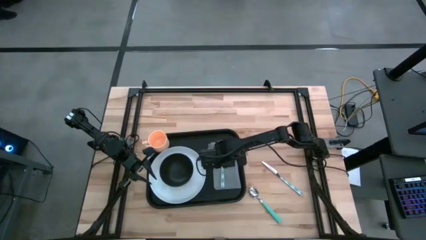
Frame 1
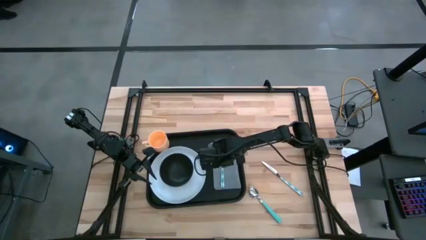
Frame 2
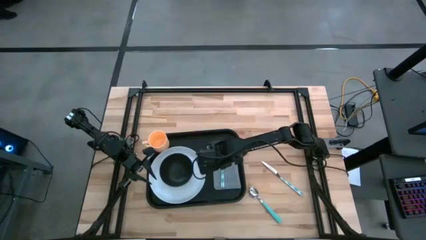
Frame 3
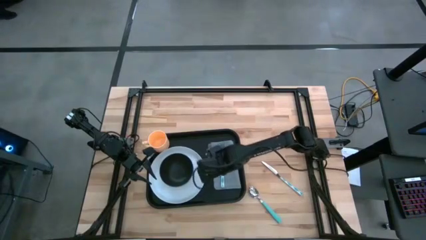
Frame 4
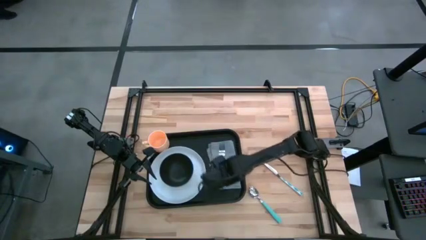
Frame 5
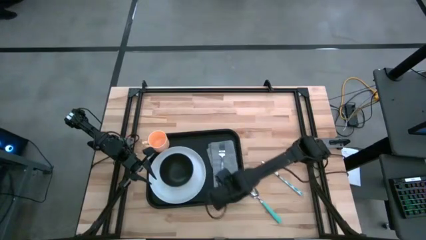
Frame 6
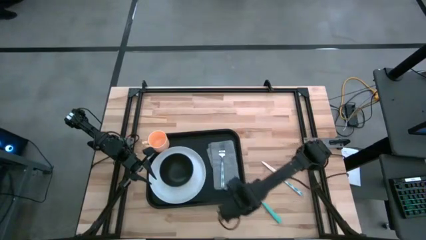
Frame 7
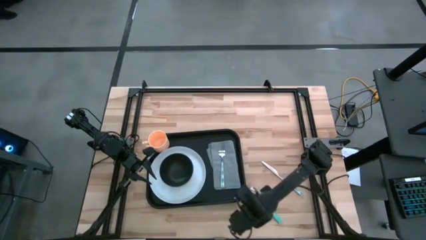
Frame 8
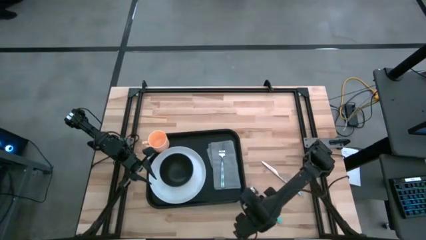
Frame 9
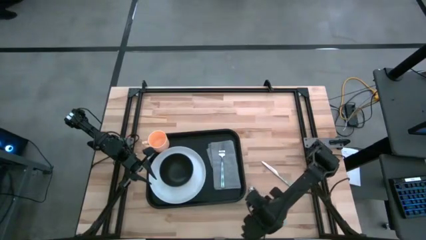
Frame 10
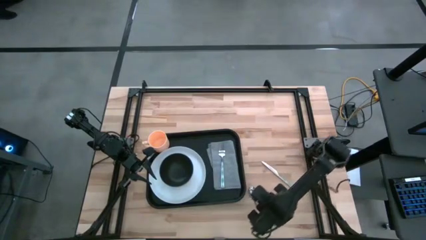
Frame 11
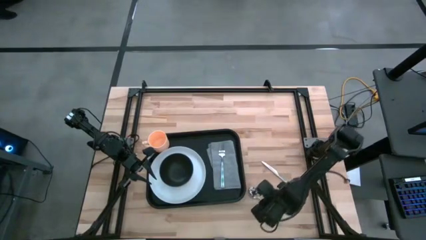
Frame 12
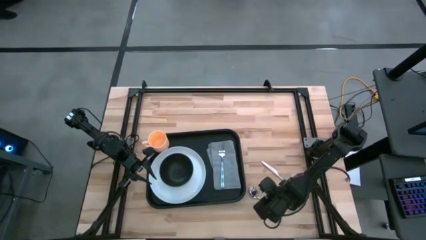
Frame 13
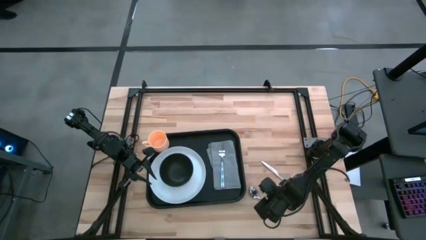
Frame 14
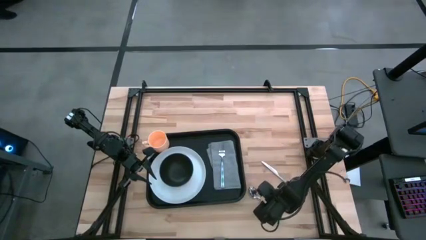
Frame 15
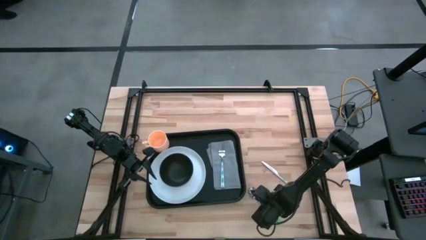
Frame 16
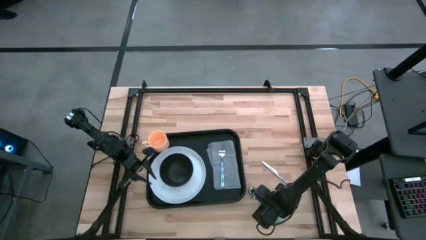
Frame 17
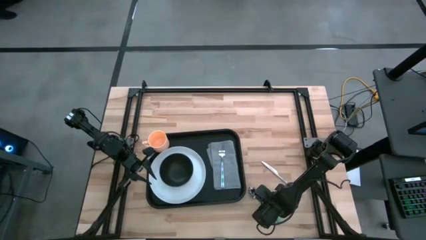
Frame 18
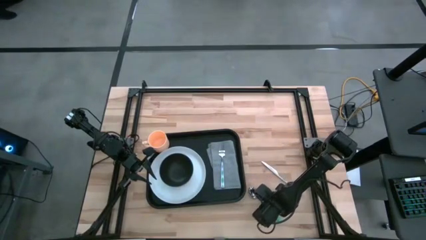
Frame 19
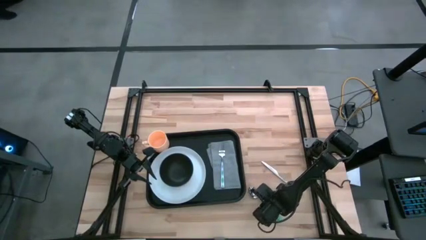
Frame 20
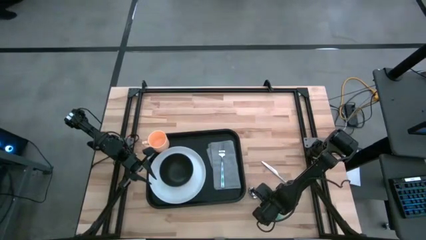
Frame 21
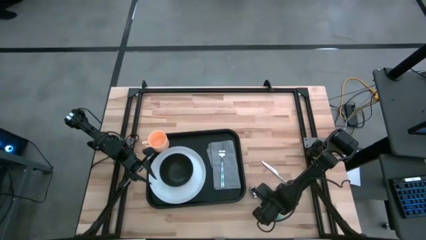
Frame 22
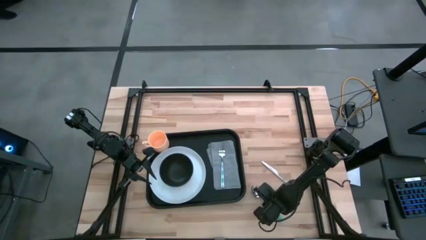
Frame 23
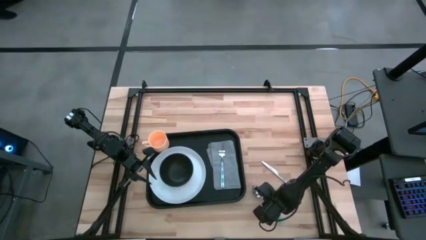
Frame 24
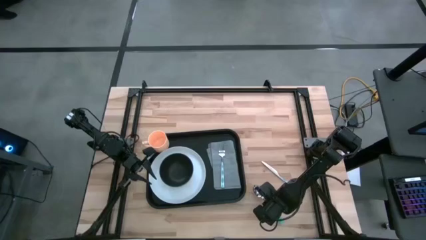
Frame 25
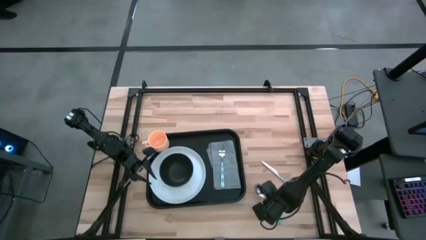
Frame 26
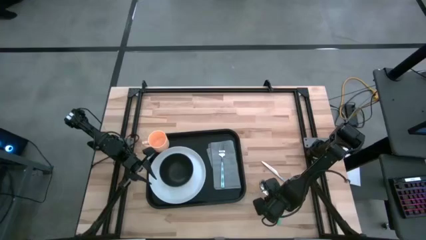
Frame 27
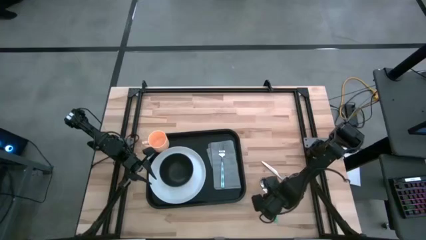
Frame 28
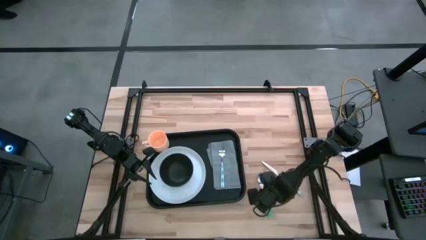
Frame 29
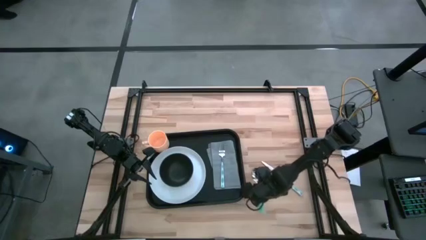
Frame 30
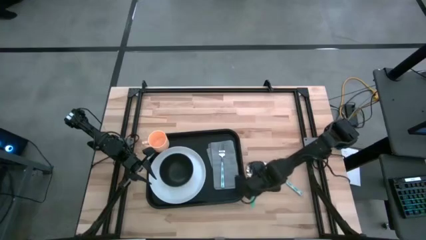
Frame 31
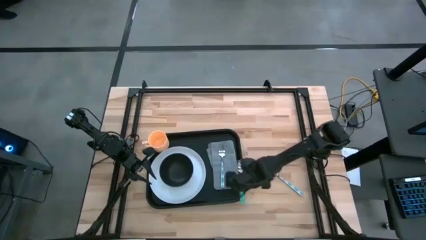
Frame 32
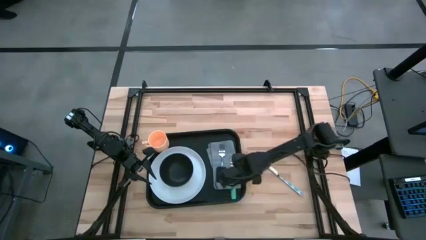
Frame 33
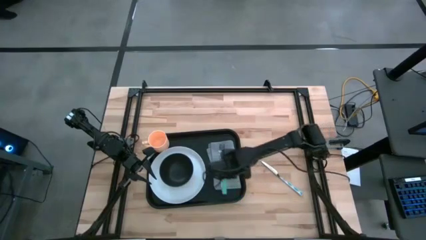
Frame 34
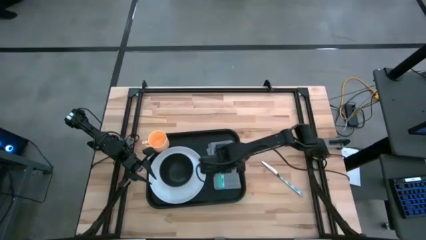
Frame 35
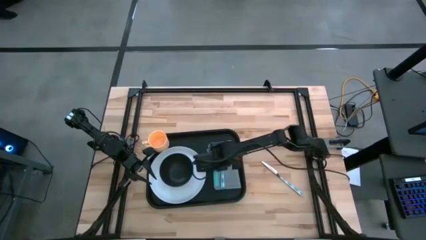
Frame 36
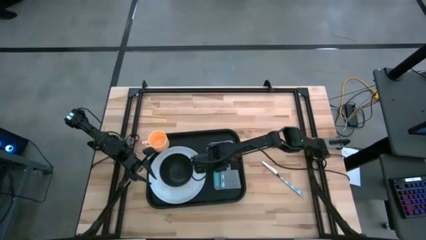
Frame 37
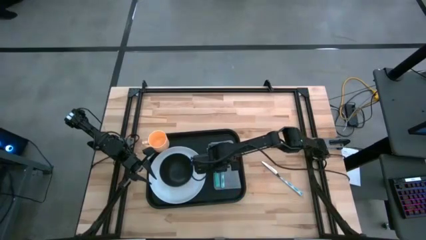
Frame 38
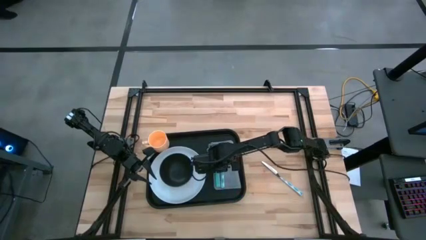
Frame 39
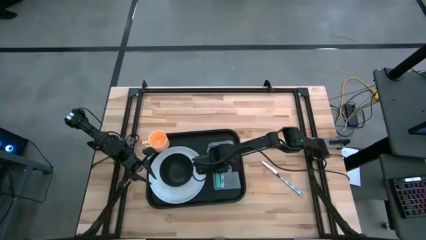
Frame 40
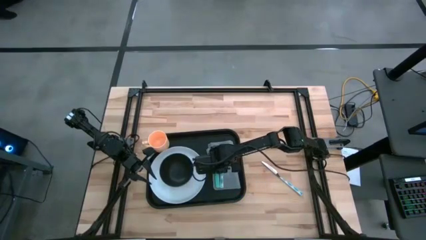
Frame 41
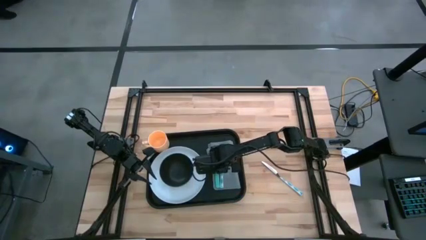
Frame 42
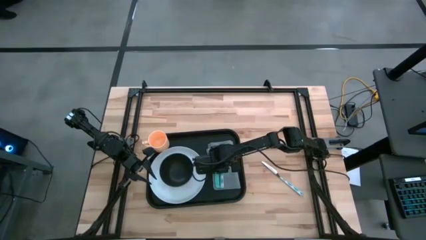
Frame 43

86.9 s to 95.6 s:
Task: Set up tray
Put the green spoon on the gray napkin to the left of the white patterned fork

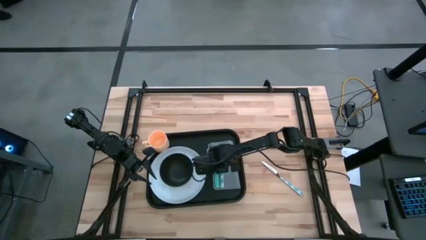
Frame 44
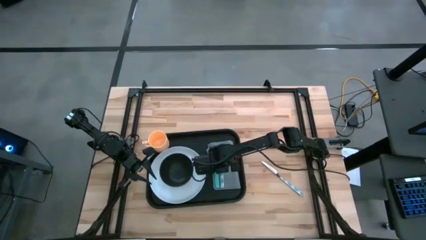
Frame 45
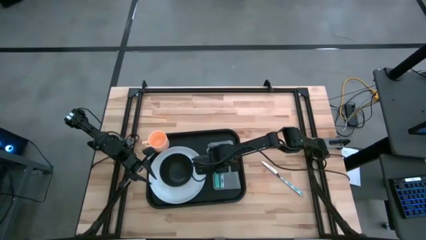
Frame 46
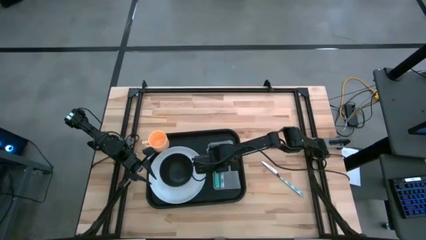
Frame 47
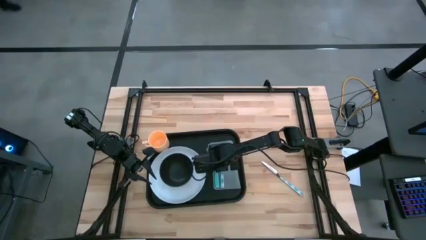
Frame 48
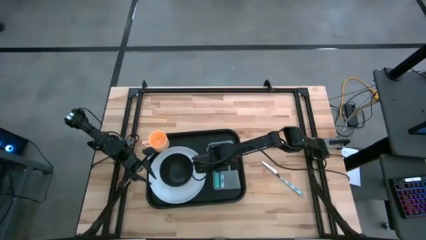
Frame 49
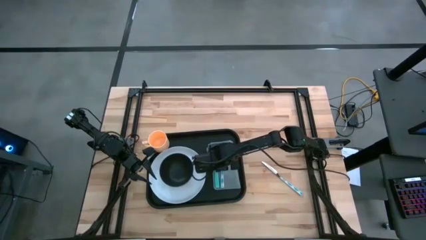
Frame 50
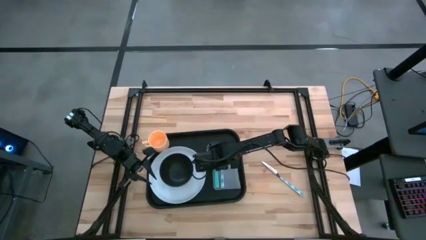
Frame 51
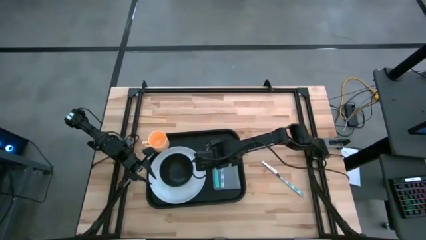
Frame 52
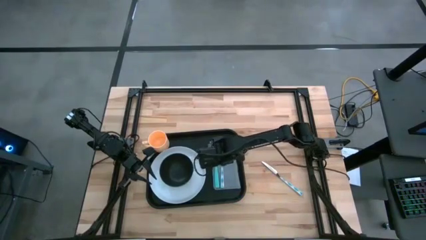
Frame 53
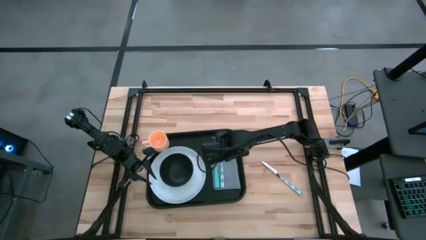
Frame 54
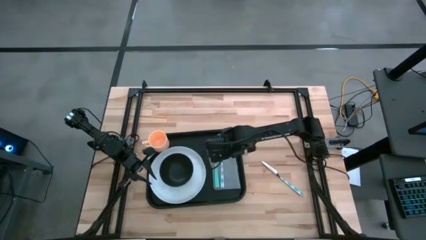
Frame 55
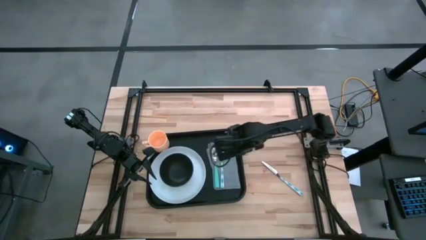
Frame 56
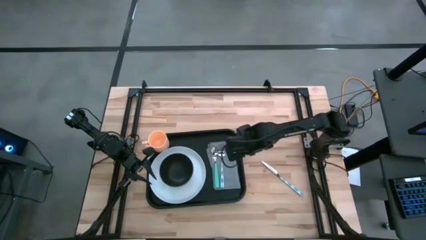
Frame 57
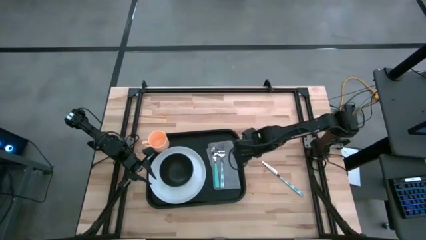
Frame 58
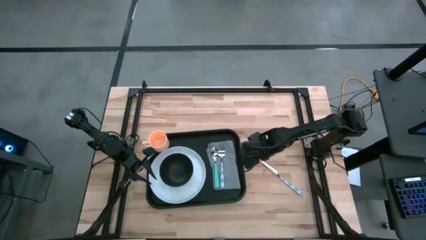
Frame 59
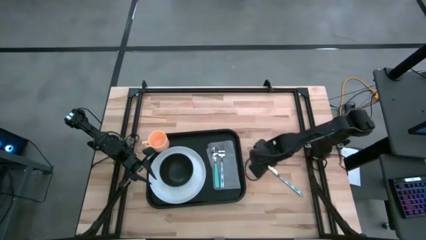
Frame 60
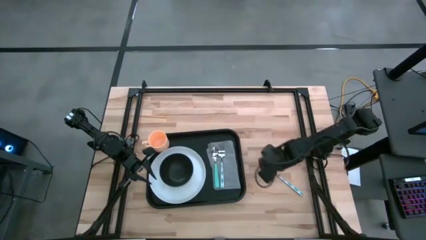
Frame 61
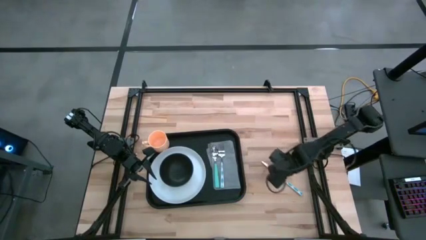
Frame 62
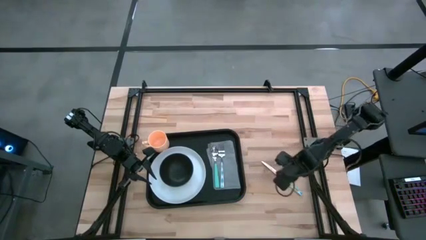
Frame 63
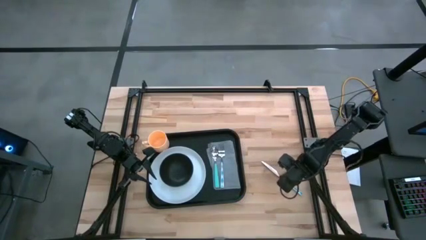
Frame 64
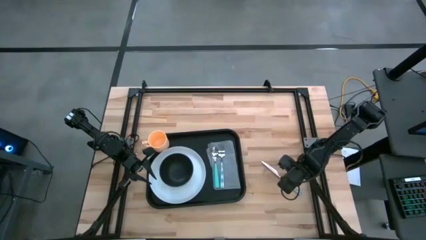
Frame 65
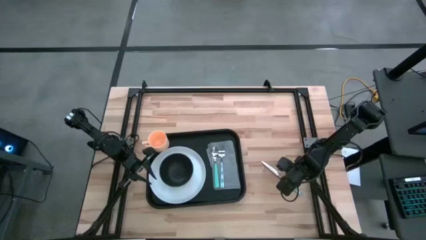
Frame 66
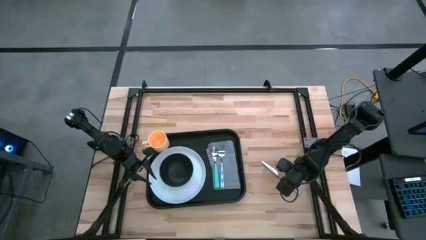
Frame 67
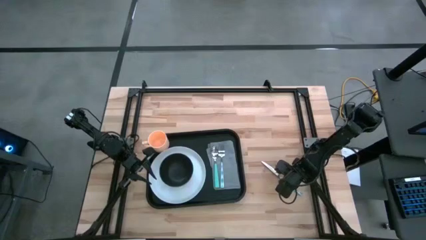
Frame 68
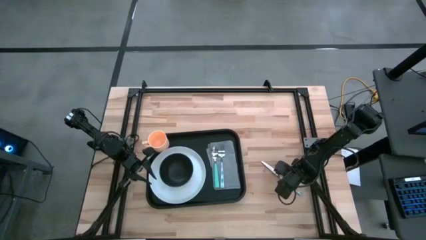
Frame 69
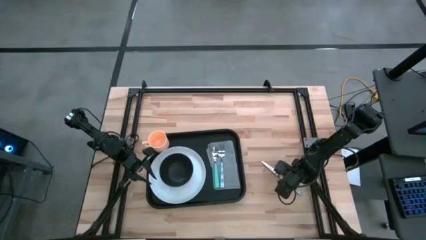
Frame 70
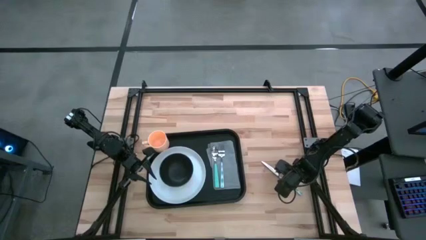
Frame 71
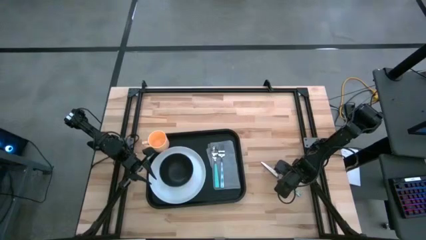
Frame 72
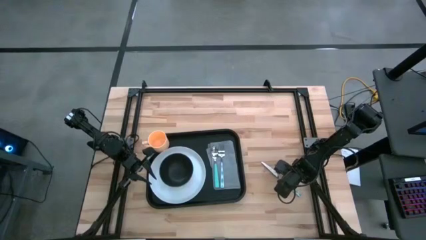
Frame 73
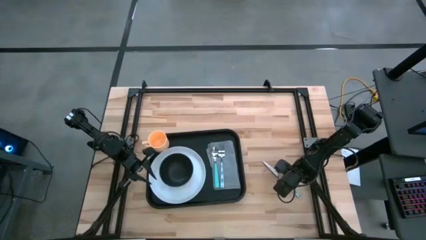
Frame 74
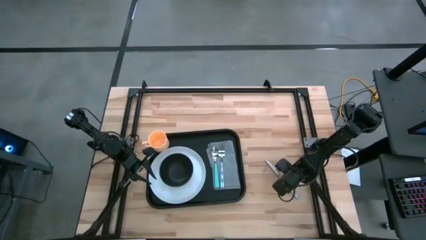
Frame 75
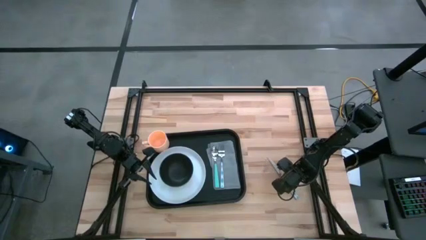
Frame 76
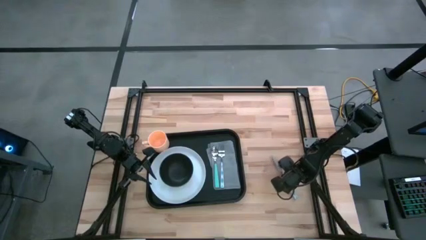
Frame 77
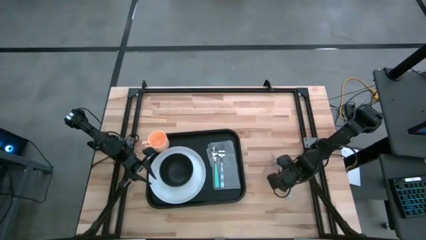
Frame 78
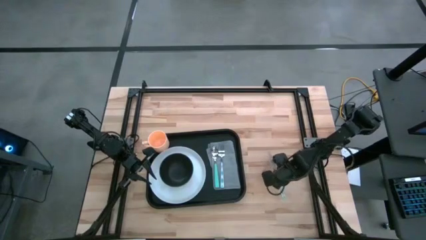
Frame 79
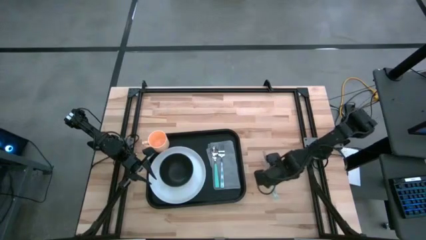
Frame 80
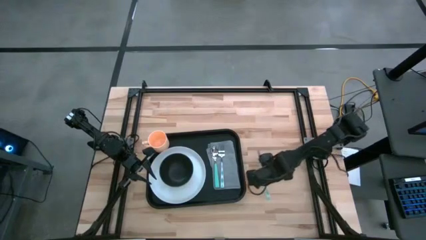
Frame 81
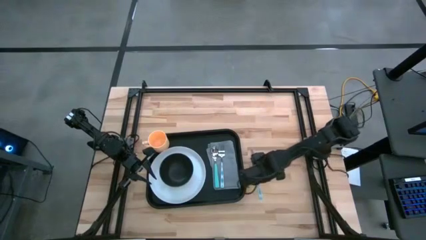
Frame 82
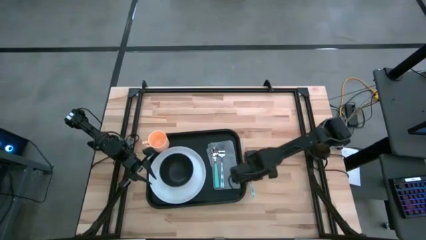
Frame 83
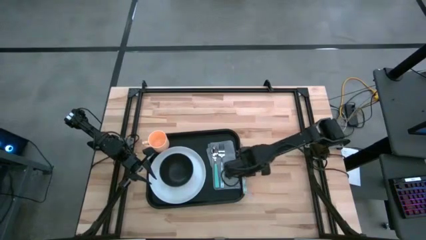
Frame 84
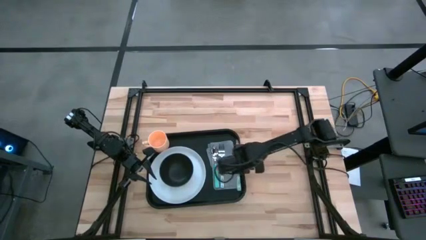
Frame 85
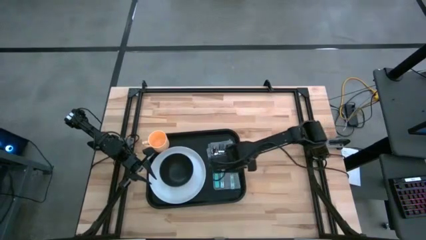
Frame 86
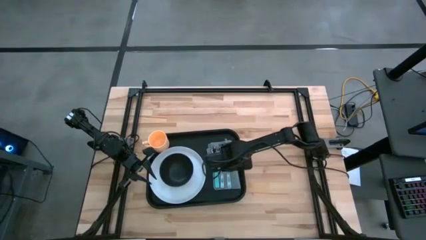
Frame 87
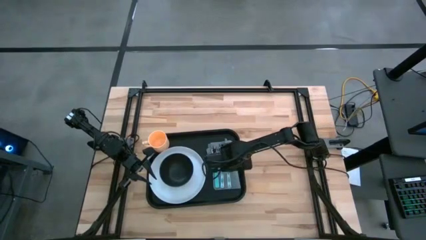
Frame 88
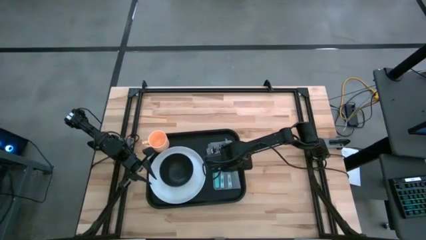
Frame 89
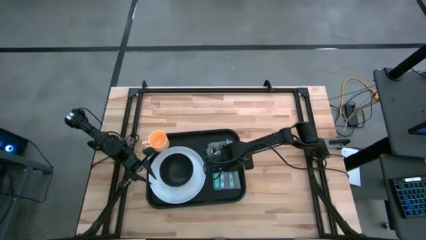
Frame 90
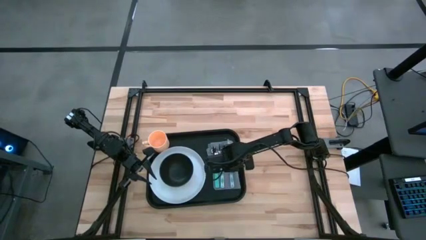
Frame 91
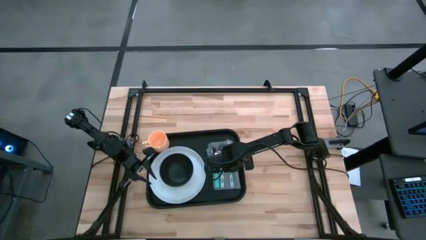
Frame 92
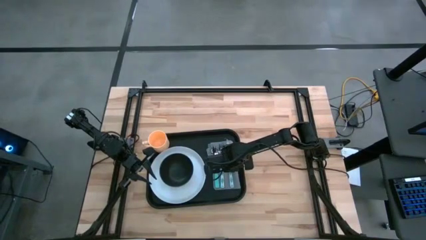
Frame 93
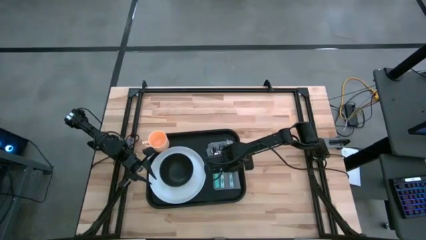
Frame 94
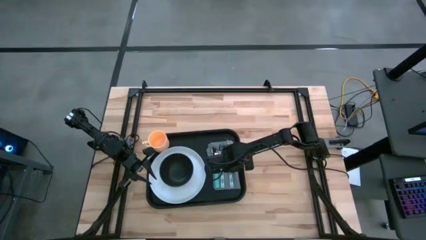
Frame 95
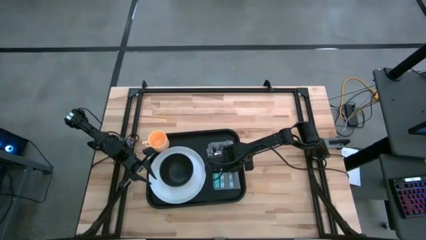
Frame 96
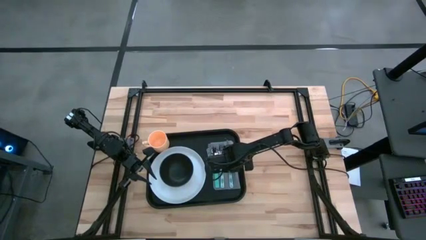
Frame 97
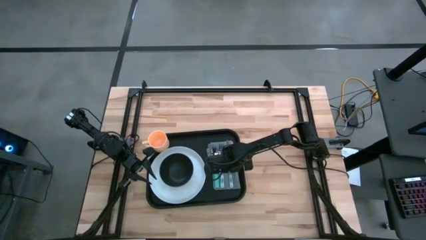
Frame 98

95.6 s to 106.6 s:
Put the white patterned knife on the gray napkin to the right of the white patterned fork
